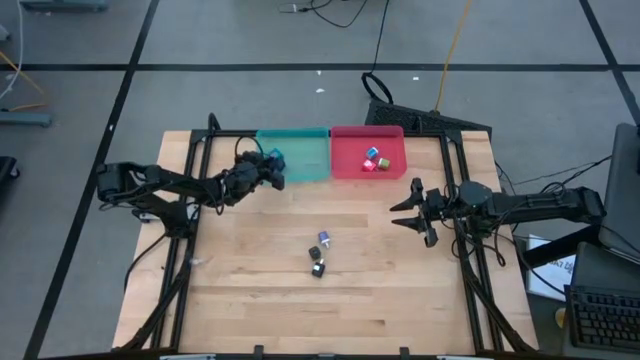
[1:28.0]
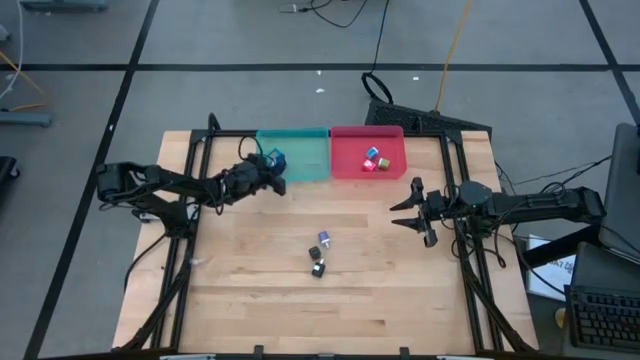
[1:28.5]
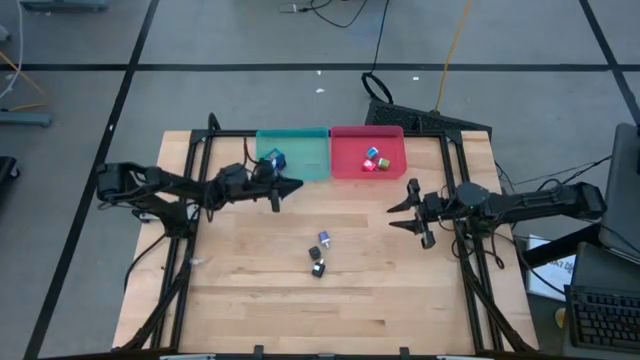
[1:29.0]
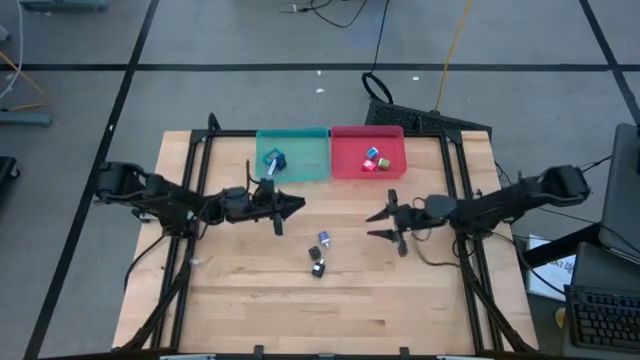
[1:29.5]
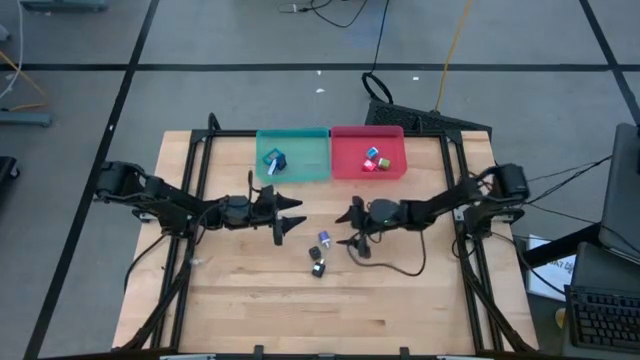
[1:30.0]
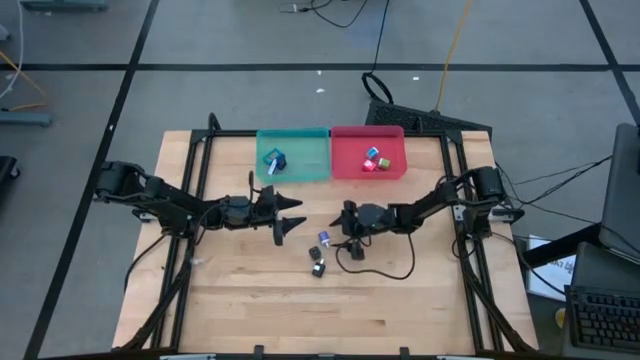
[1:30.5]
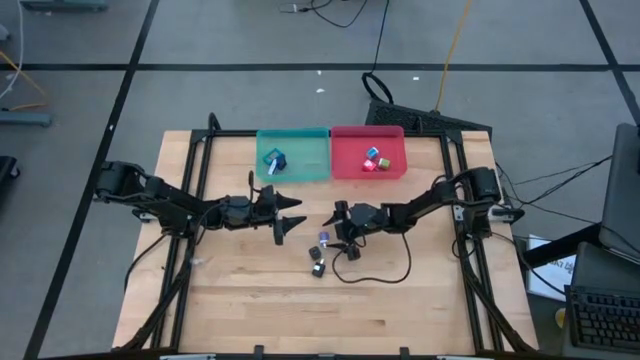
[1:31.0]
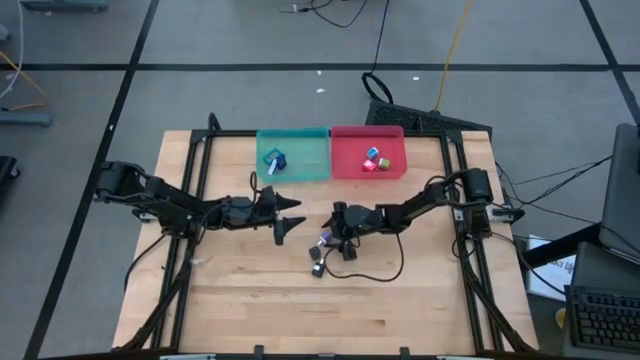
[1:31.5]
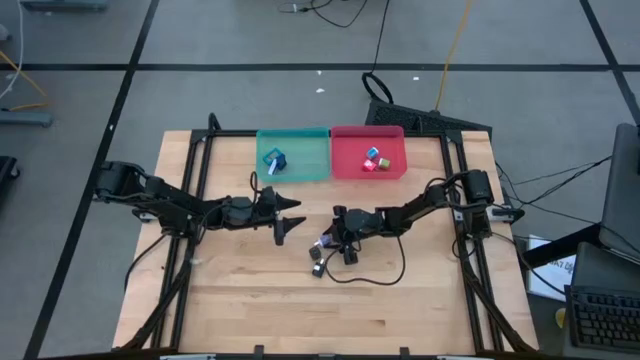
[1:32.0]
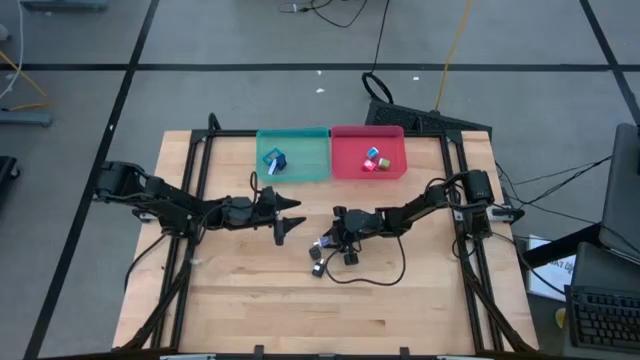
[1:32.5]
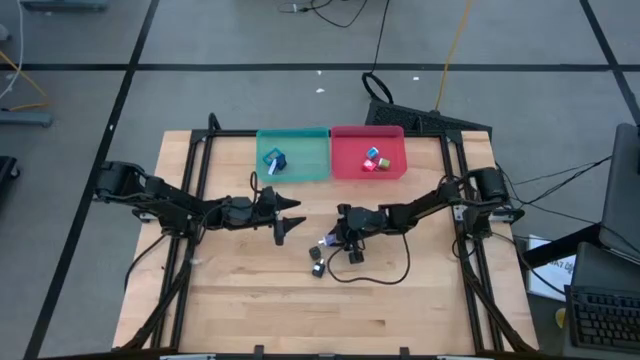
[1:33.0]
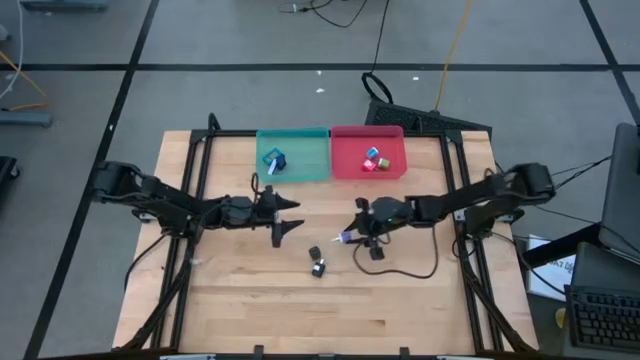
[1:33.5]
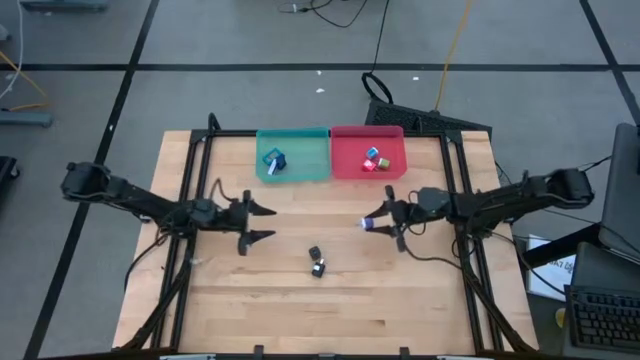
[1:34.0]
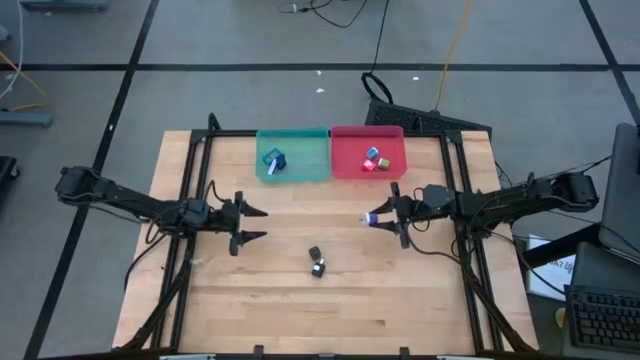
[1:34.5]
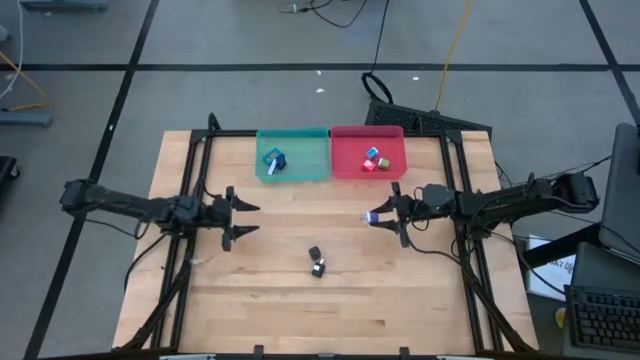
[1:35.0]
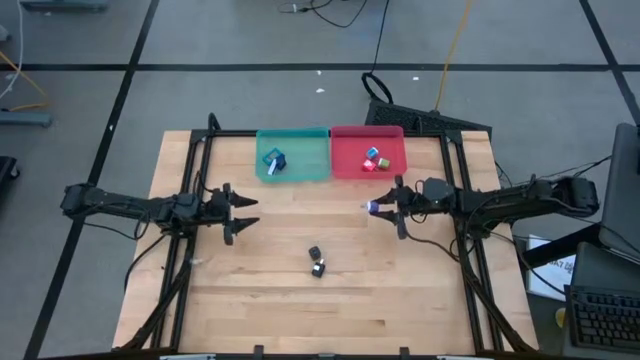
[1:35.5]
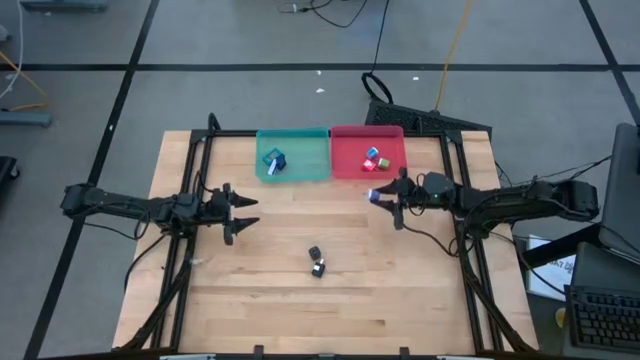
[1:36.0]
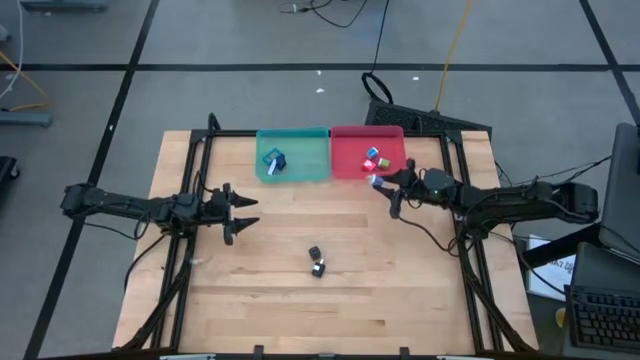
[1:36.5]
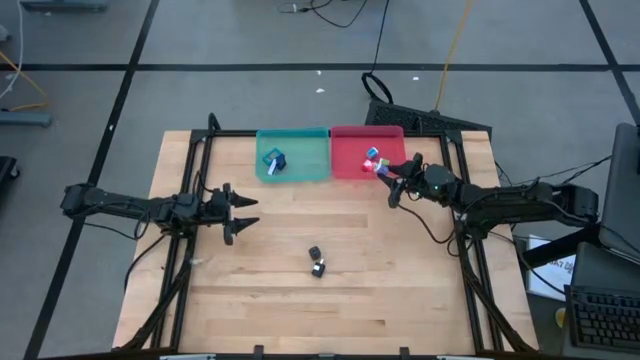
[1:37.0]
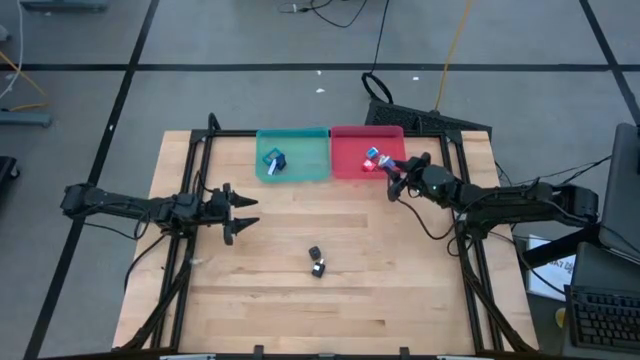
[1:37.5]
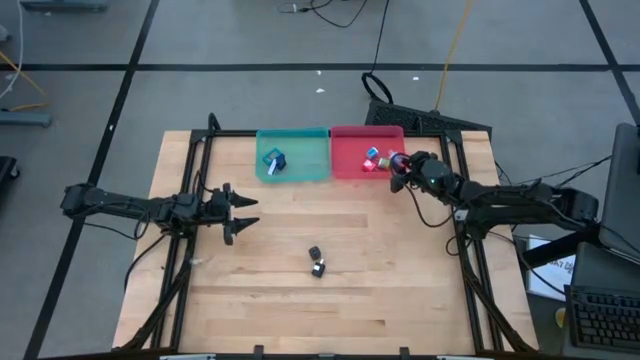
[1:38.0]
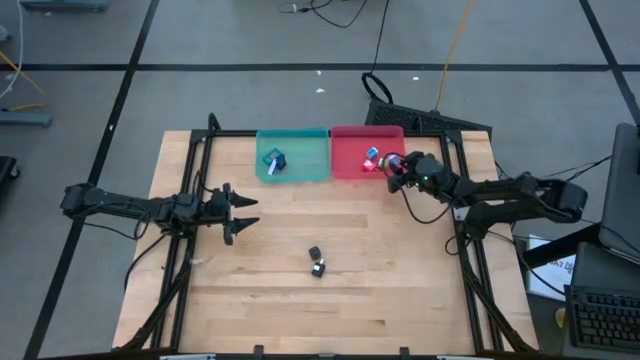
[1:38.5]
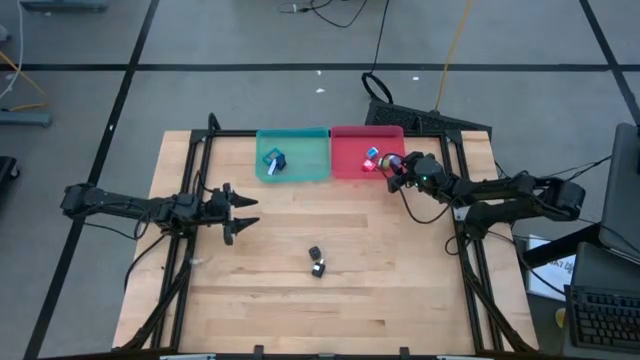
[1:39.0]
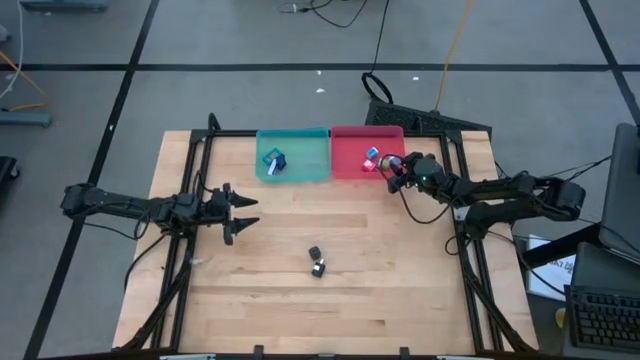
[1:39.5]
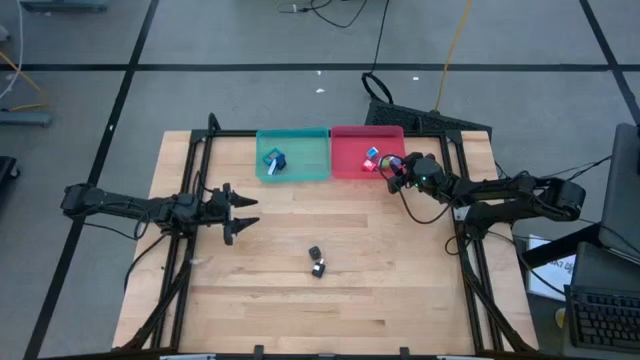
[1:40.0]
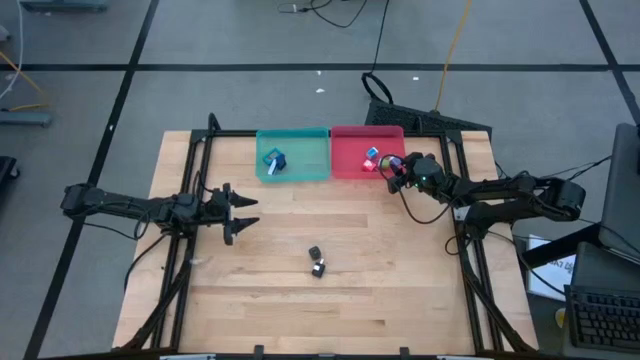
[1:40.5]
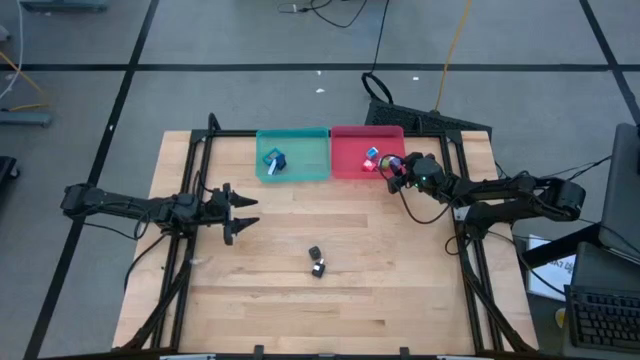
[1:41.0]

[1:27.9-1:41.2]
Task: Sort charging adapters and watches
Put the dark blue charging adapter in the red bin

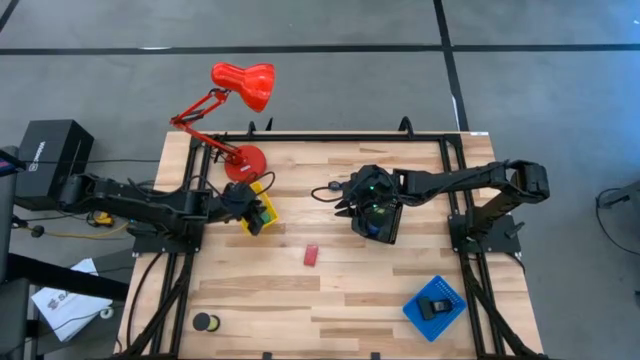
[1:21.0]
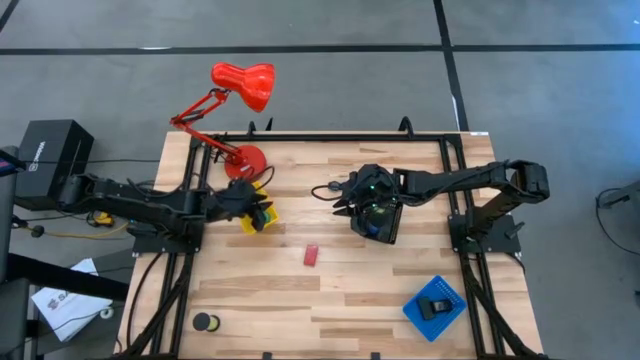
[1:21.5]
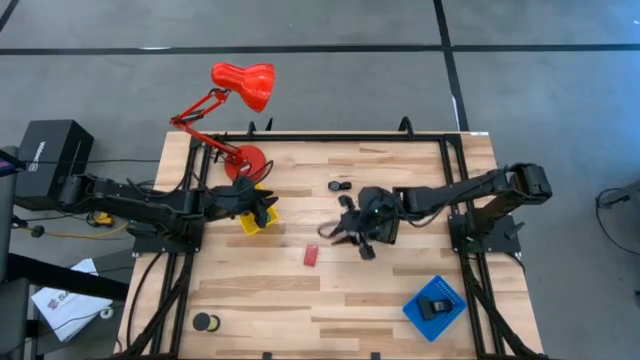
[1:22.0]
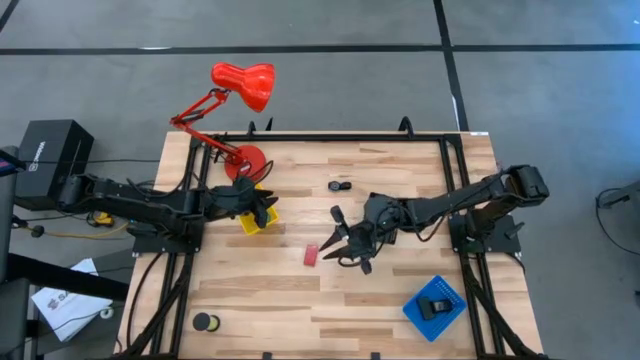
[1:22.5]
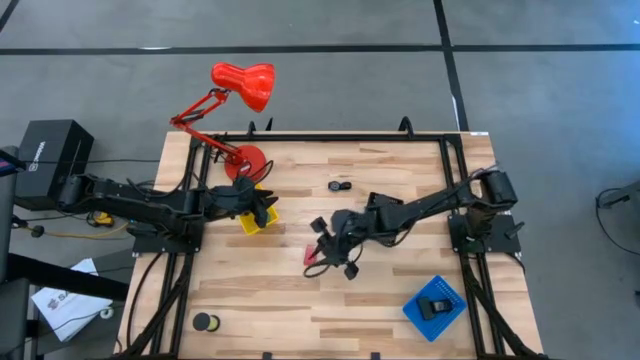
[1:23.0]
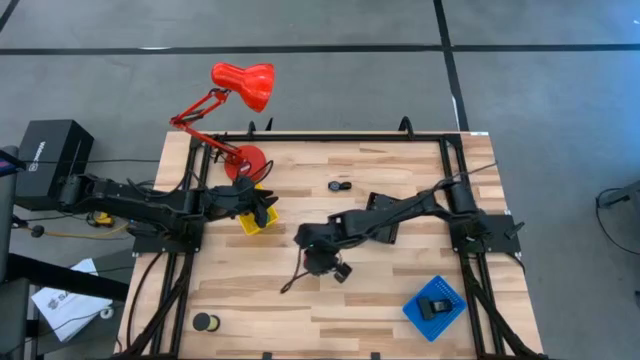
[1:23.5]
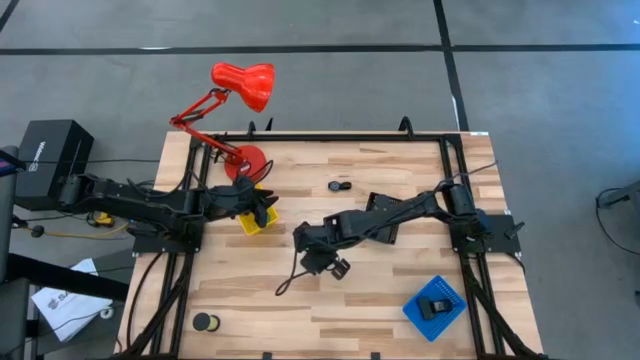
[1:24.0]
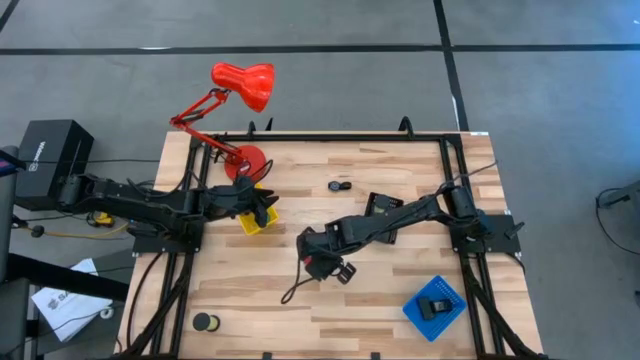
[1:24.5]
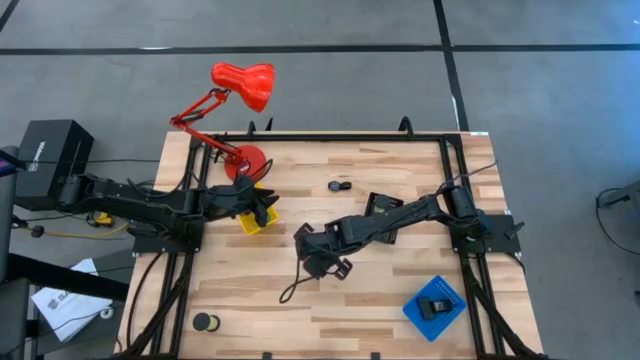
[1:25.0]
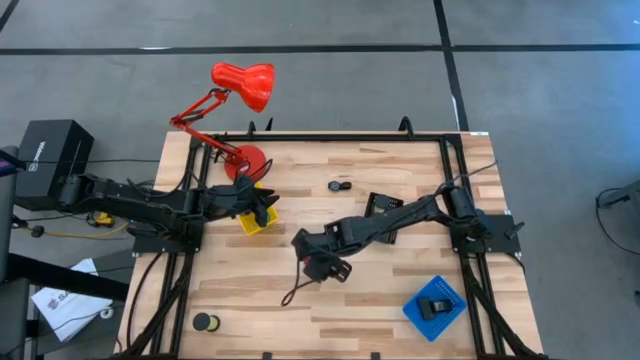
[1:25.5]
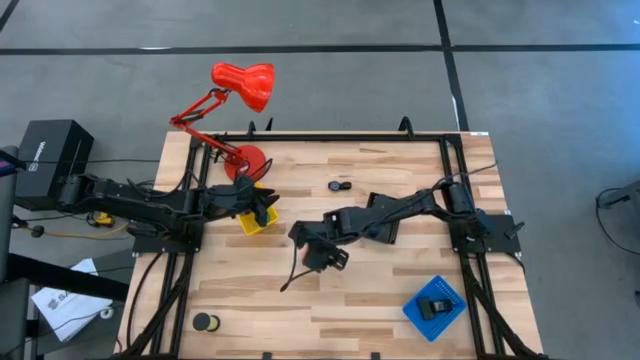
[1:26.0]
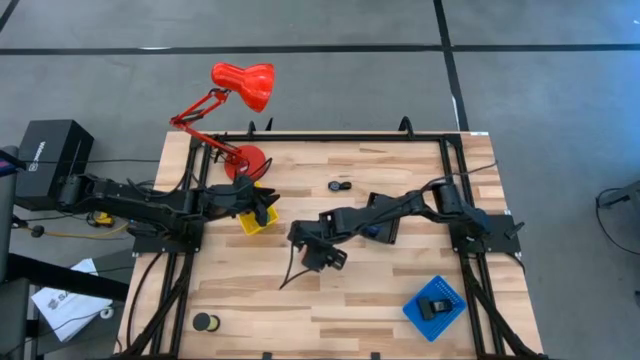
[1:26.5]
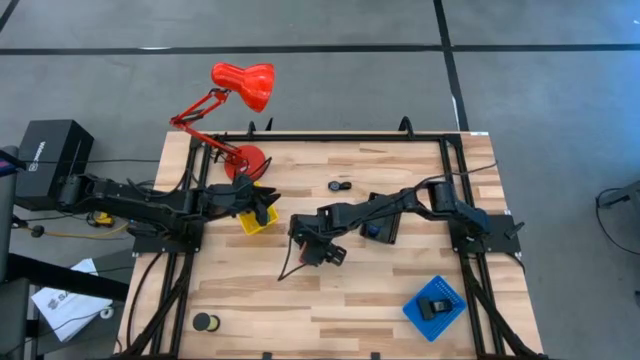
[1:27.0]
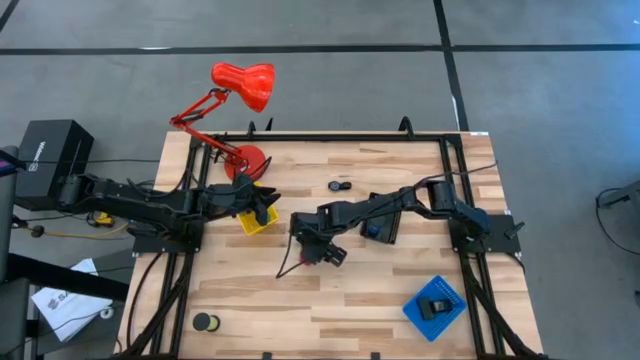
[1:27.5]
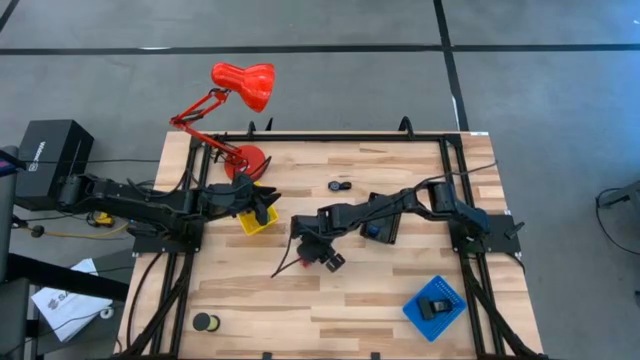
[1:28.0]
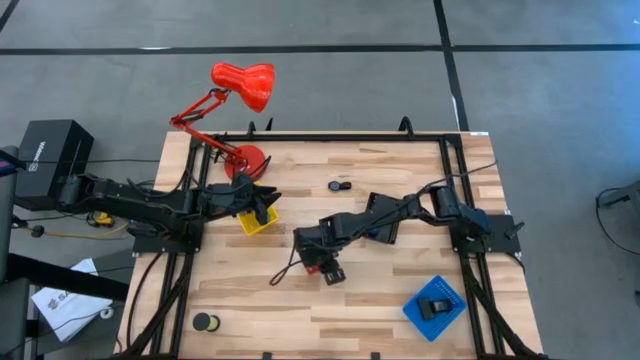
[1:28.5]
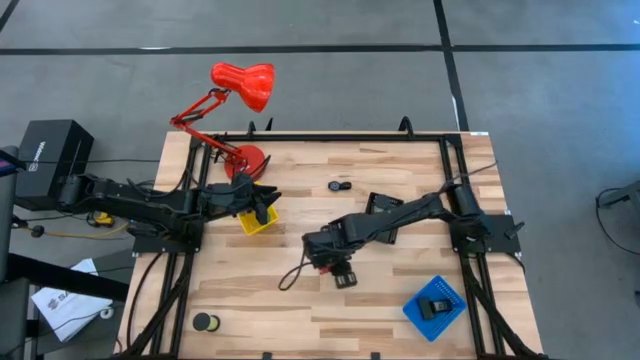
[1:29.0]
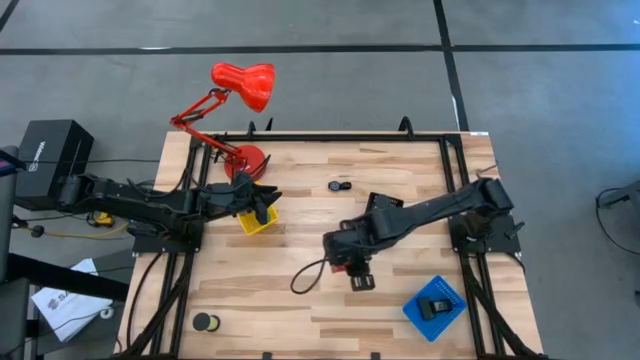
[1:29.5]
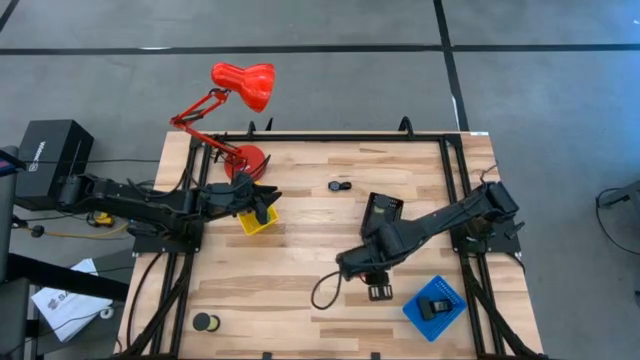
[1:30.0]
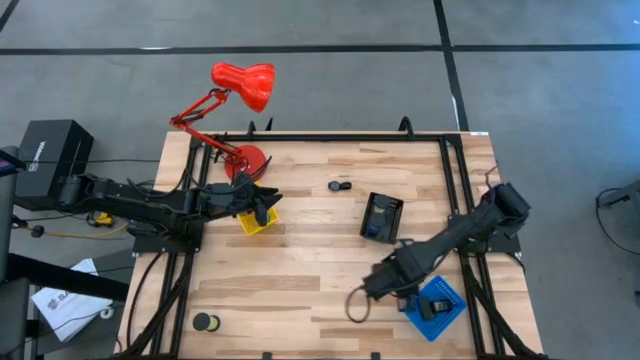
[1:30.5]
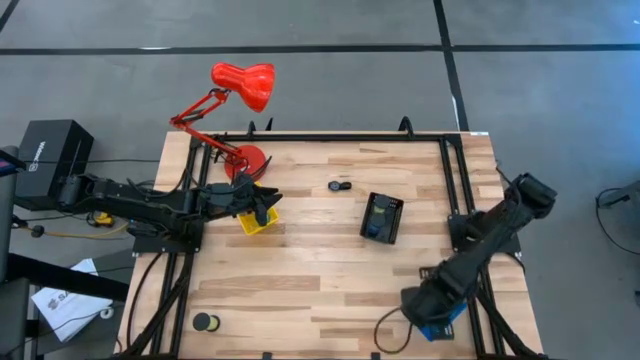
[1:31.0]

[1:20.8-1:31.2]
Task: Pick & Place Office items
Put the red digital timer into the blue bin
